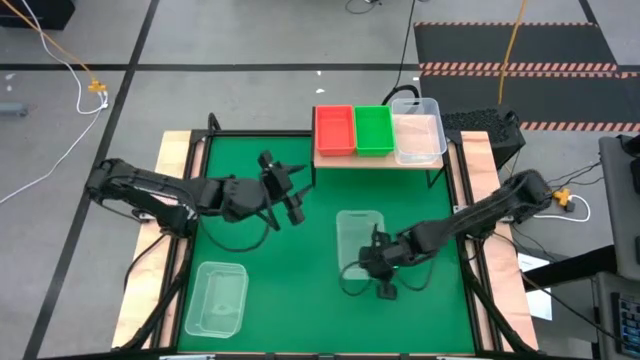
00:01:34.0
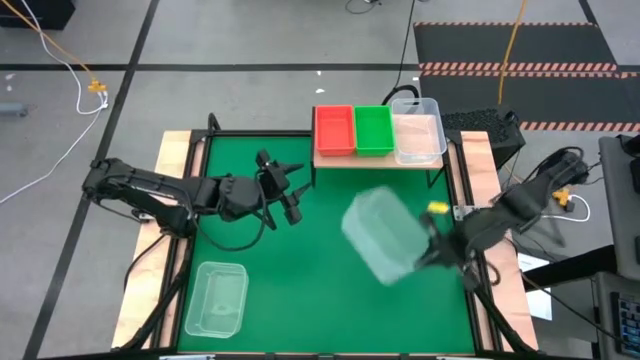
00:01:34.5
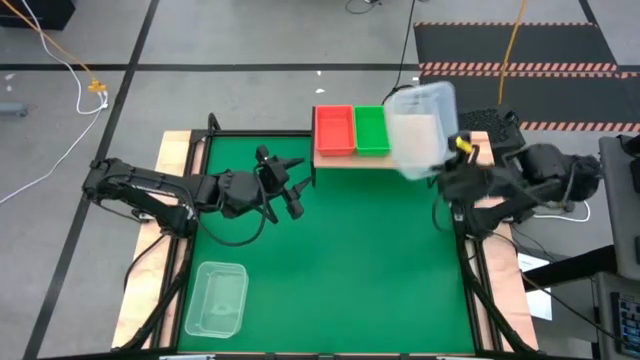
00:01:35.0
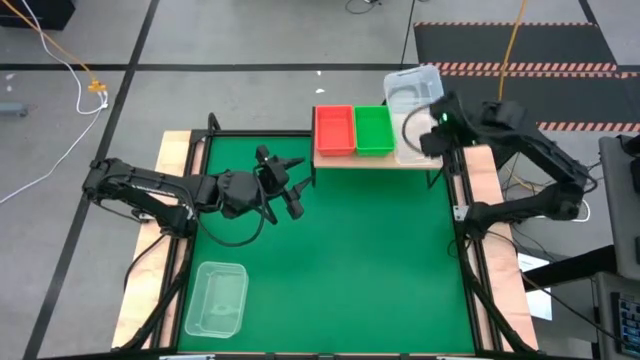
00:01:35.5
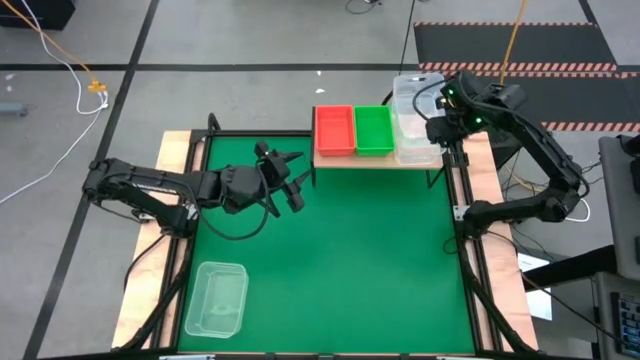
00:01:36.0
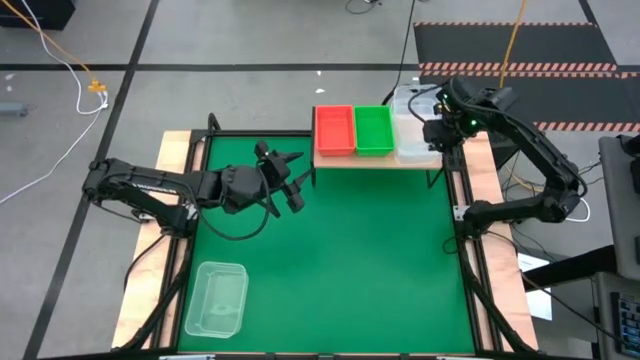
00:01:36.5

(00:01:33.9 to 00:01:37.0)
Task: Stack baskets on shelf by color
Stack the top transparent bin on the top of the transparent bin

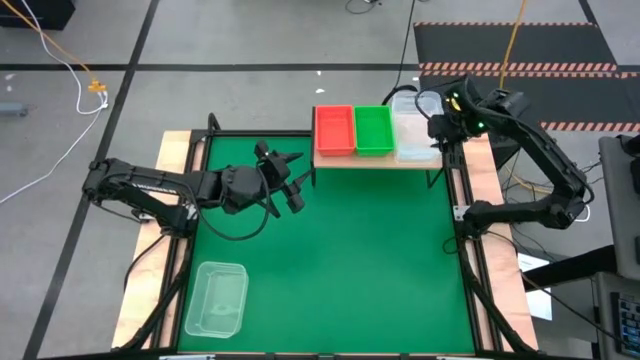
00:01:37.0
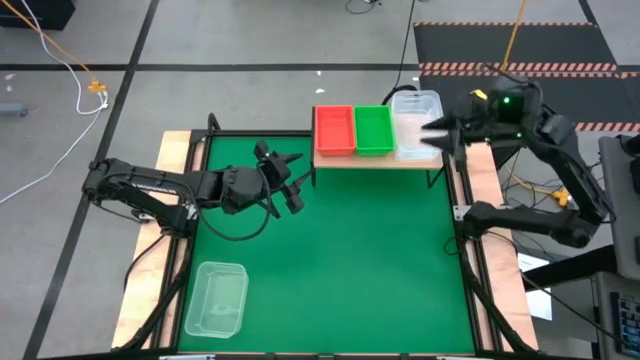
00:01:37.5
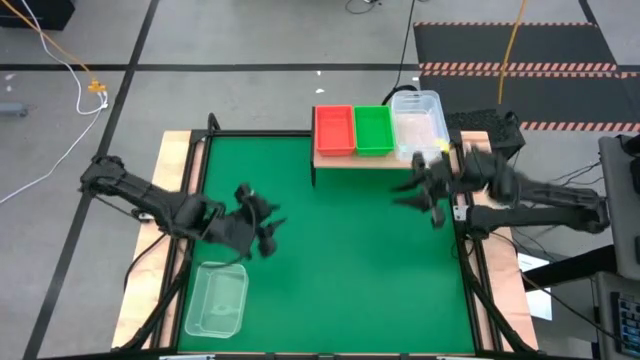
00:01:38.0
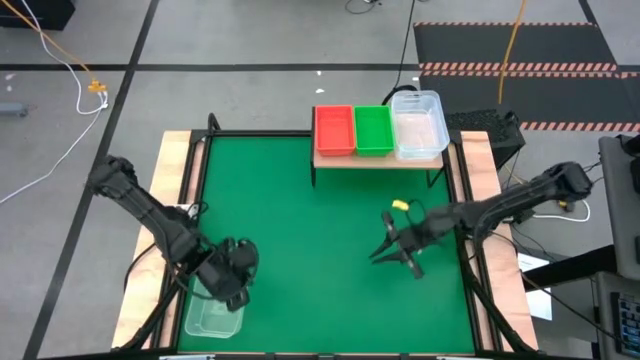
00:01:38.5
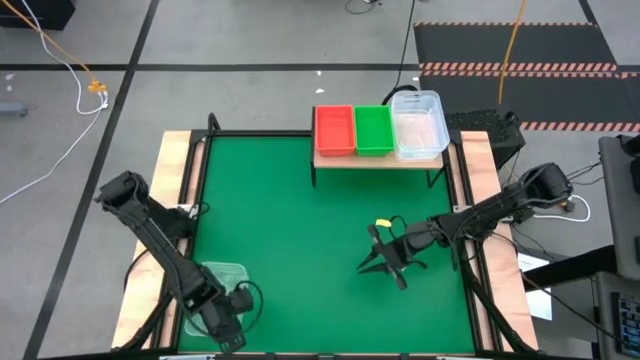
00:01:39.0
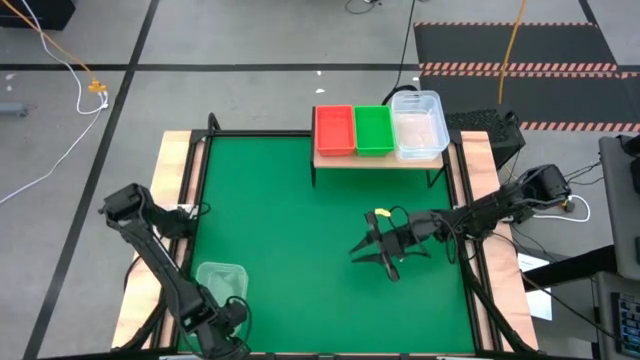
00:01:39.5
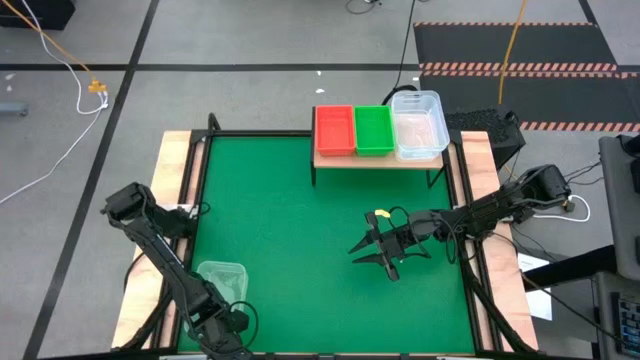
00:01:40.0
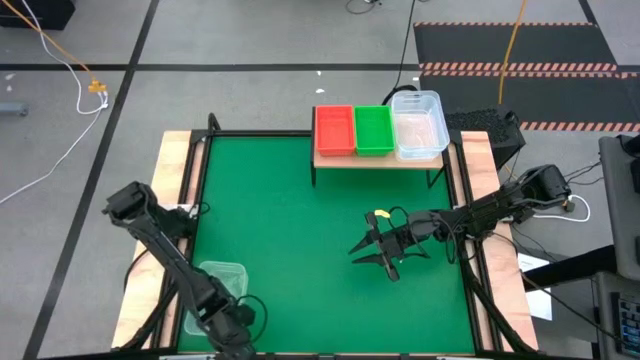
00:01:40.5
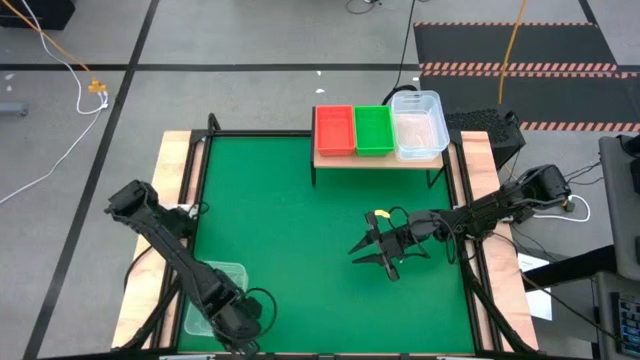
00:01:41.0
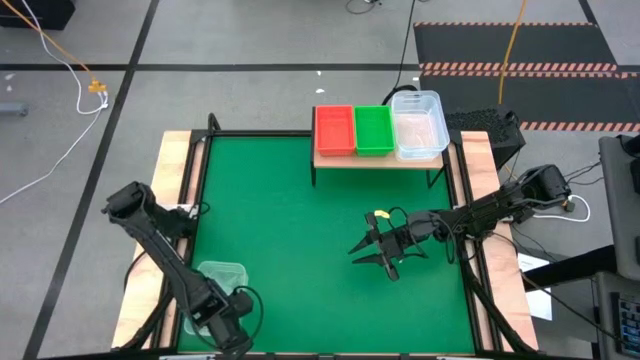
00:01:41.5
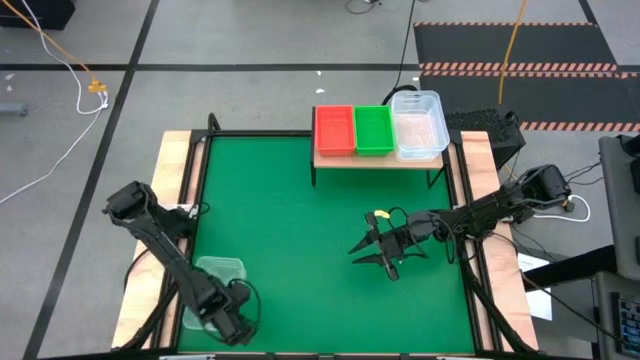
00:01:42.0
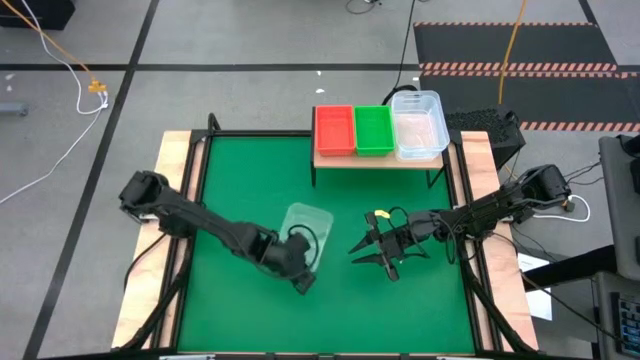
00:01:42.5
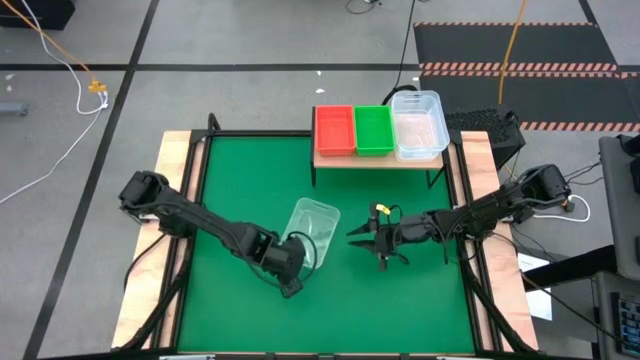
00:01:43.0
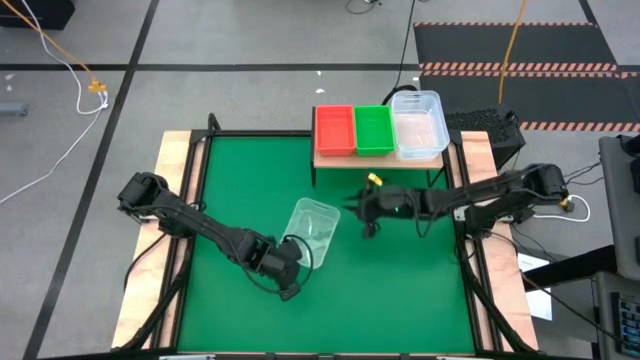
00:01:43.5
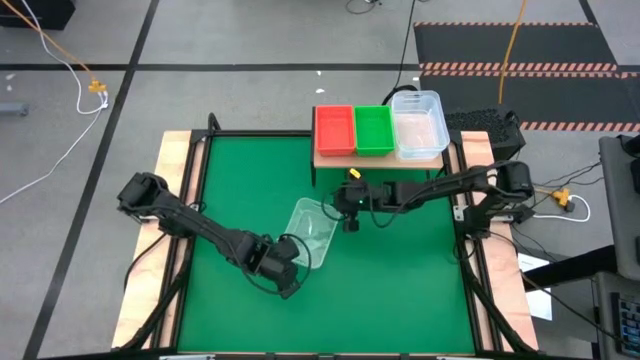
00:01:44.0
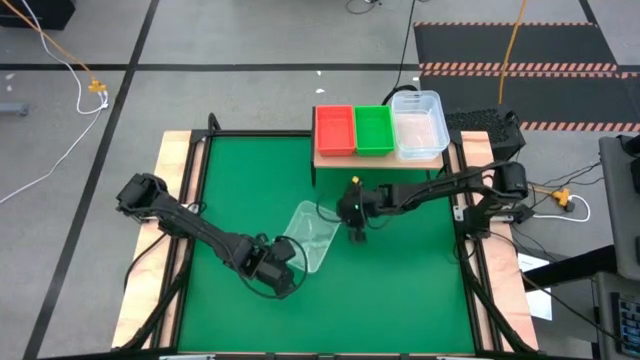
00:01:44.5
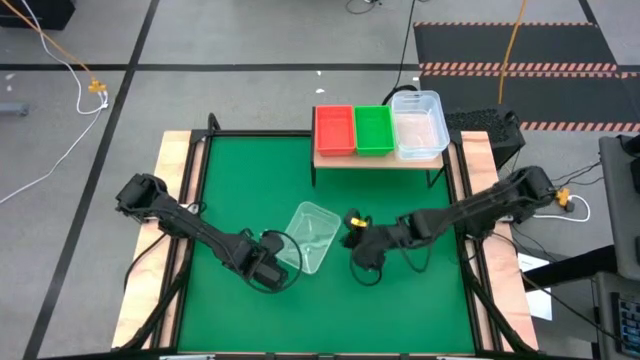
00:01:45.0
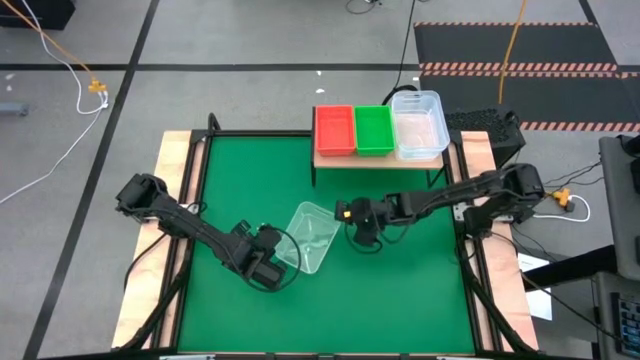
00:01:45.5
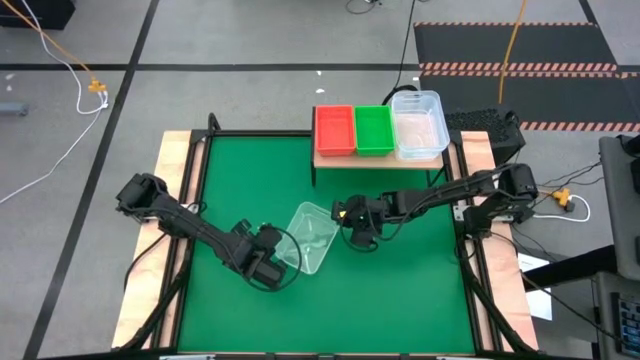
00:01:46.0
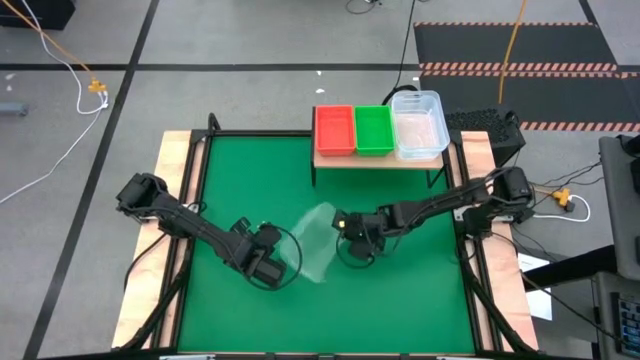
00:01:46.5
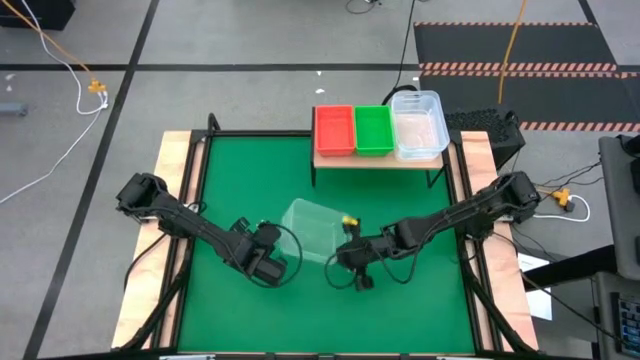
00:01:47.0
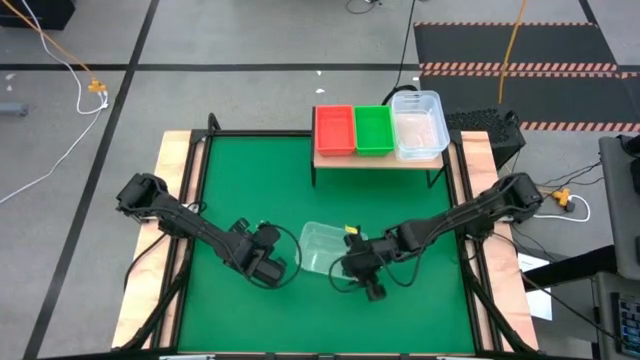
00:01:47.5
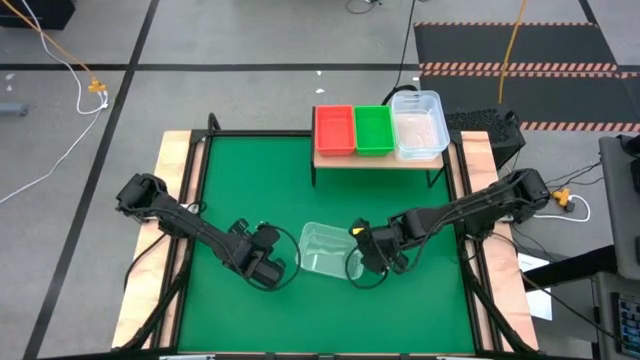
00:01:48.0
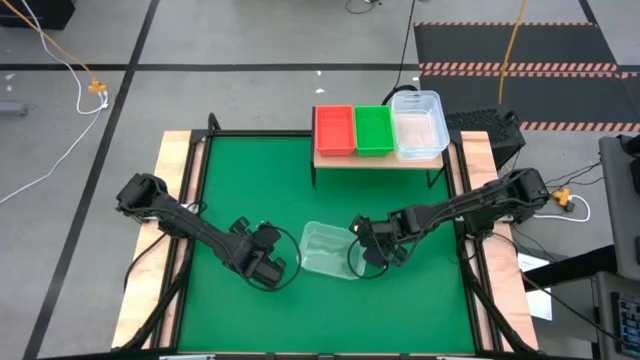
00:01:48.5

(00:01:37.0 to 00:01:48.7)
Stack the top transparent bin on the top of the transparent bin

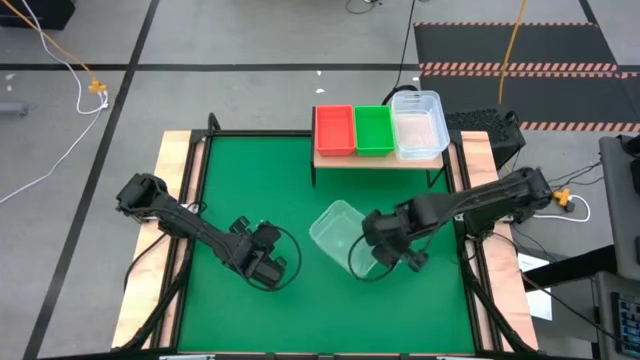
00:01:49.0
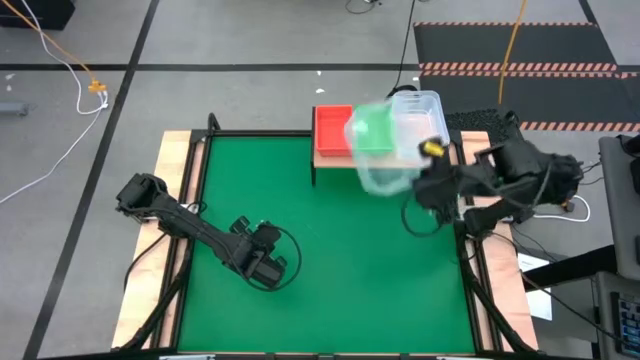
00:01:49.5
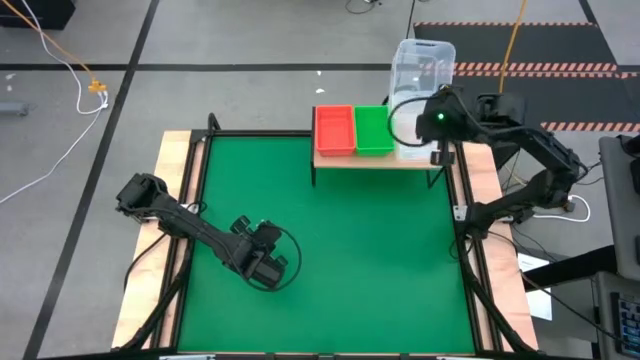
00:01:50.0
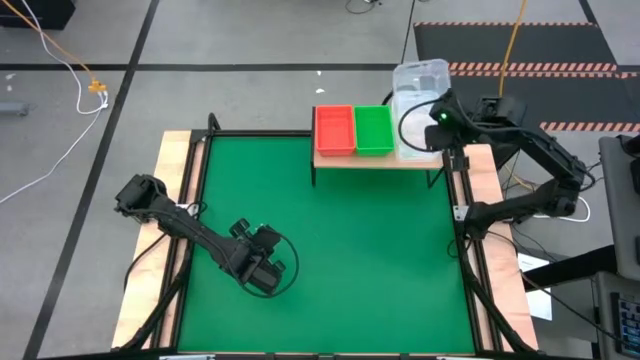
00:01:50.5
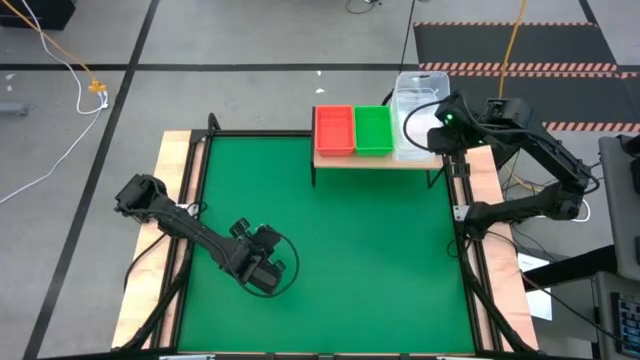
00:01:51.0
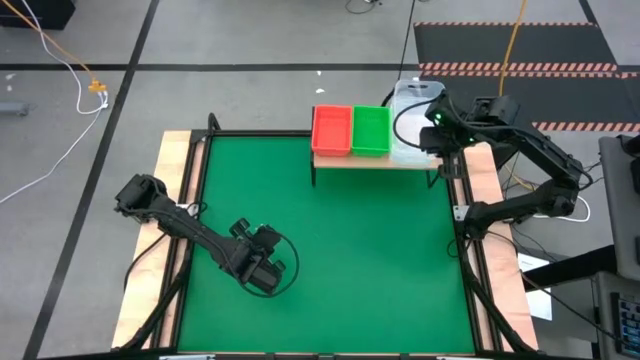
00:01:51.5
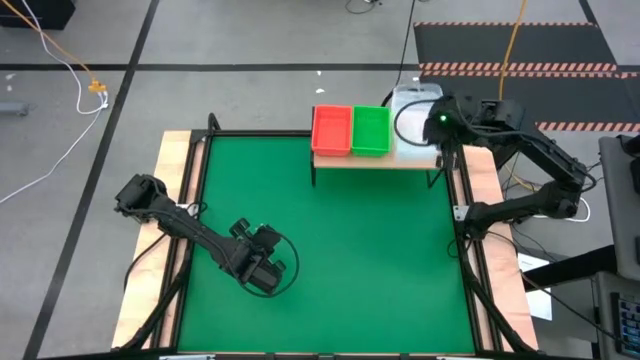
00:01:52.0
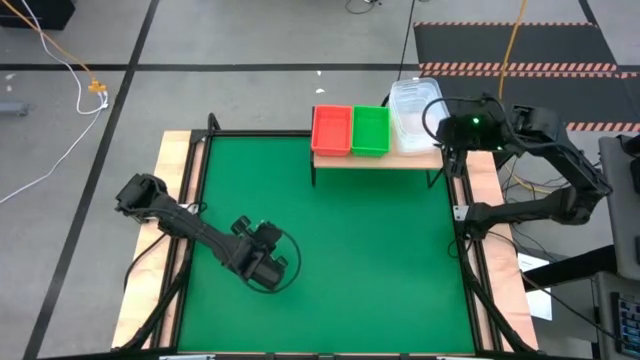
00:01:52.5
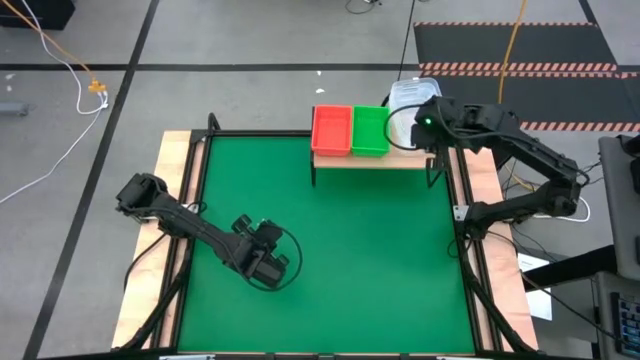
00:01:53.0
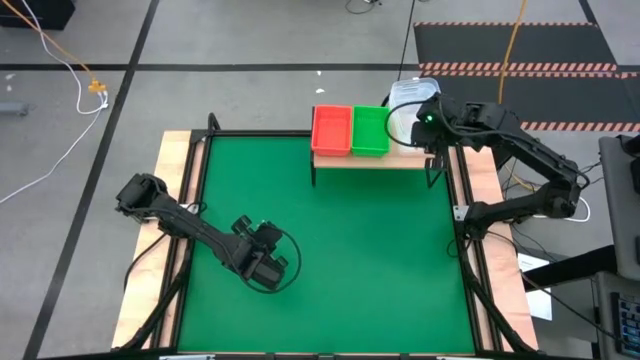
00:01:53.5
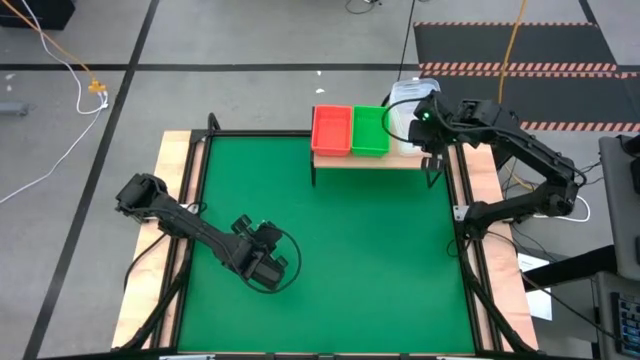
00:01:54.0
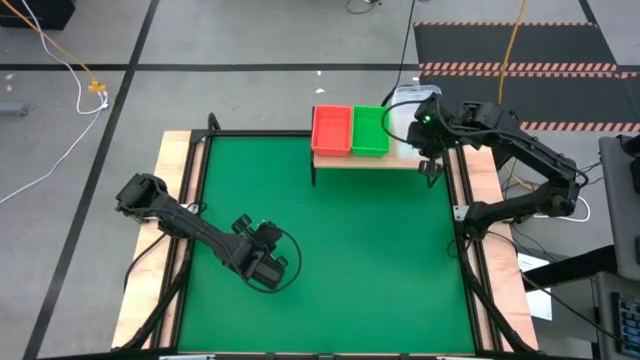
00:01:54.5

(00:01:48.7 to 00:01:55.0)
Stack the top transparent bin on the top of the transparent bin
